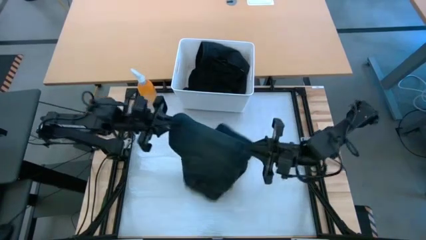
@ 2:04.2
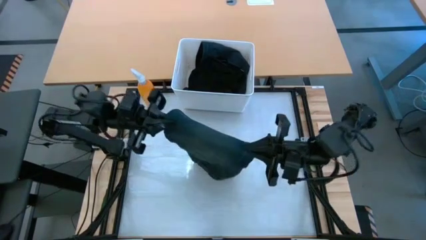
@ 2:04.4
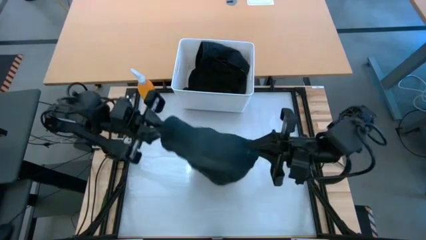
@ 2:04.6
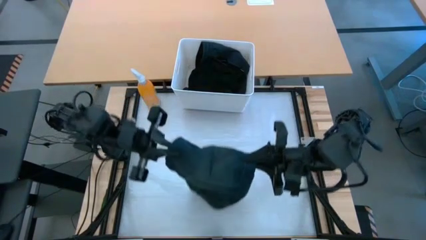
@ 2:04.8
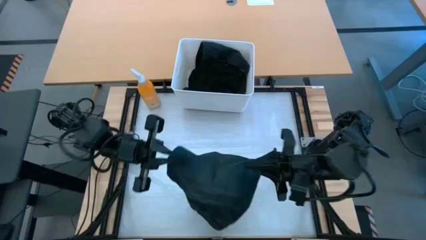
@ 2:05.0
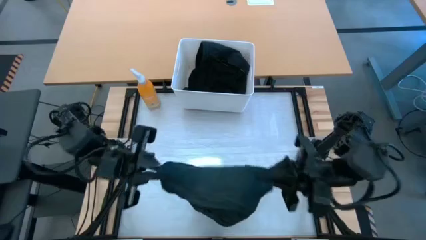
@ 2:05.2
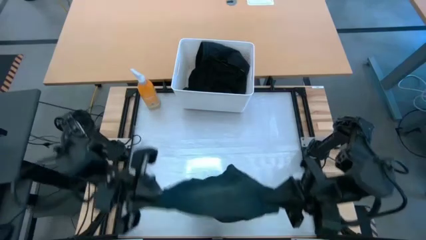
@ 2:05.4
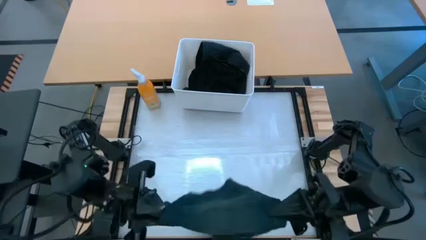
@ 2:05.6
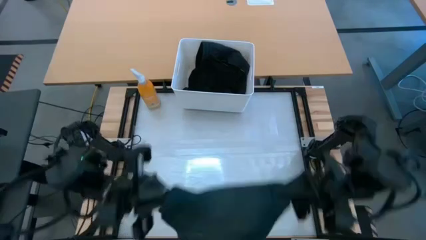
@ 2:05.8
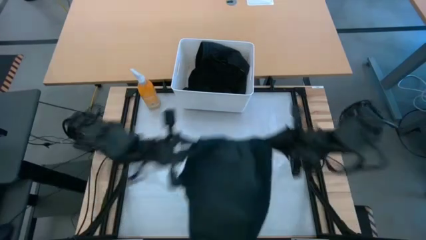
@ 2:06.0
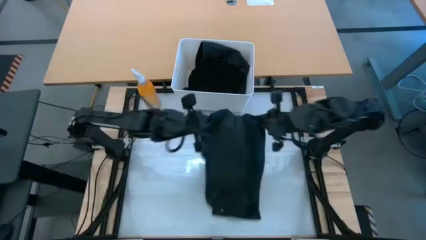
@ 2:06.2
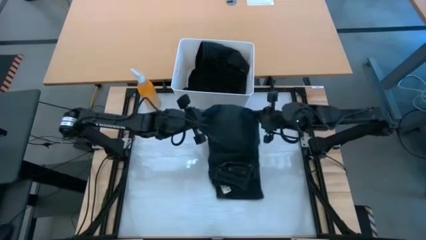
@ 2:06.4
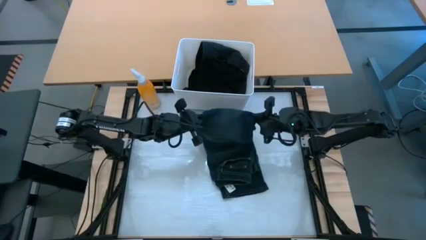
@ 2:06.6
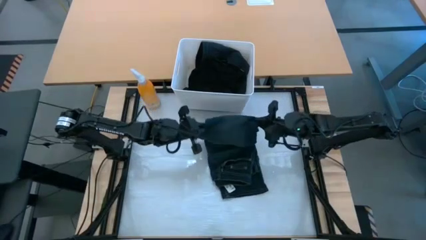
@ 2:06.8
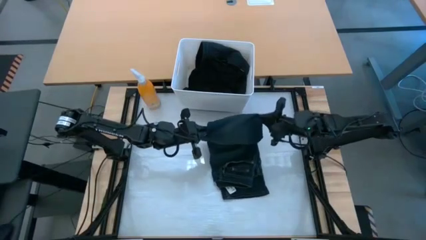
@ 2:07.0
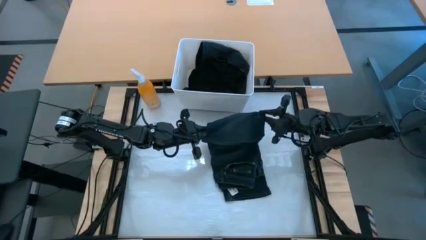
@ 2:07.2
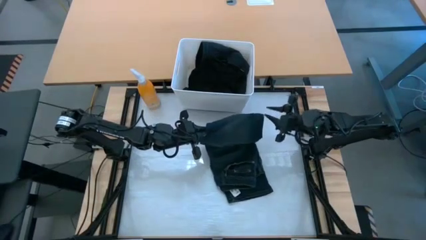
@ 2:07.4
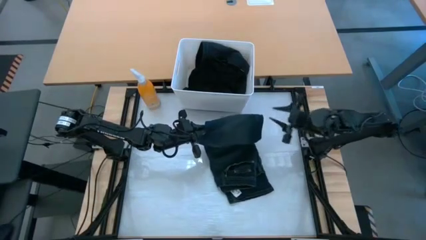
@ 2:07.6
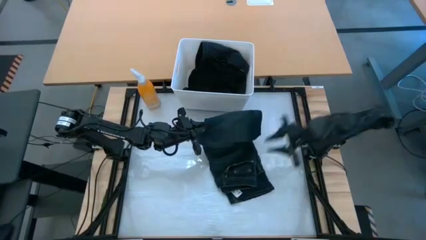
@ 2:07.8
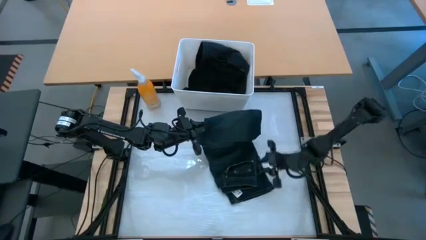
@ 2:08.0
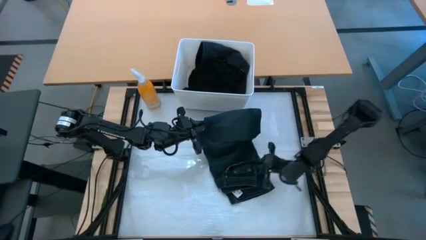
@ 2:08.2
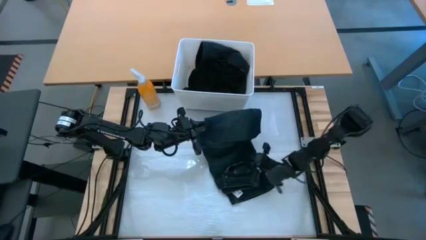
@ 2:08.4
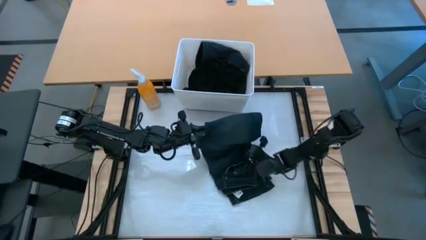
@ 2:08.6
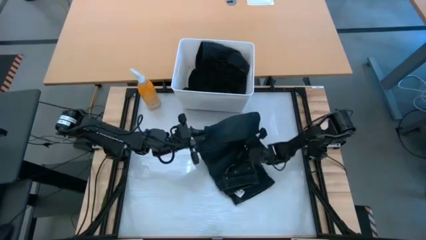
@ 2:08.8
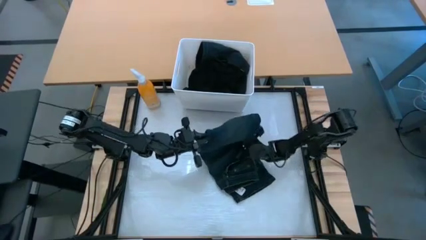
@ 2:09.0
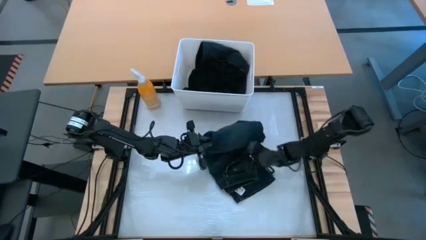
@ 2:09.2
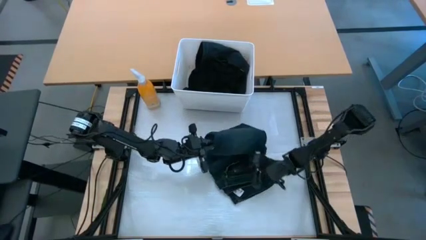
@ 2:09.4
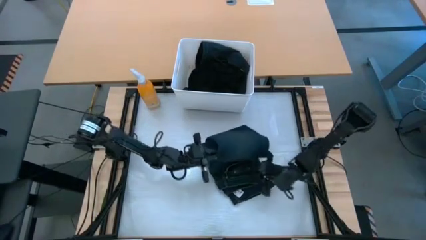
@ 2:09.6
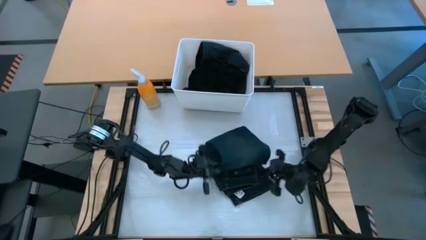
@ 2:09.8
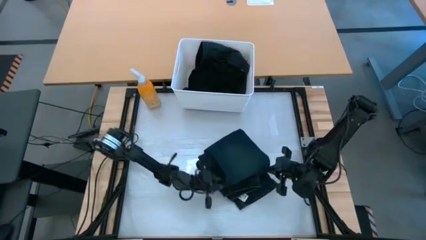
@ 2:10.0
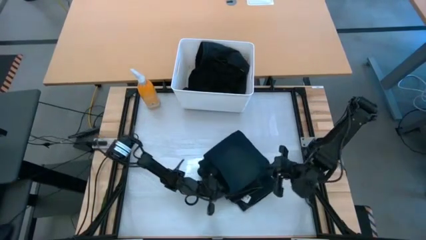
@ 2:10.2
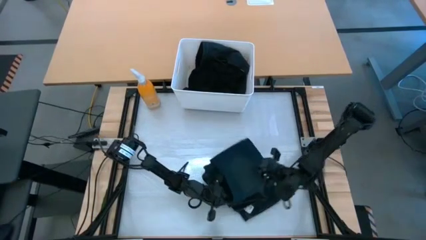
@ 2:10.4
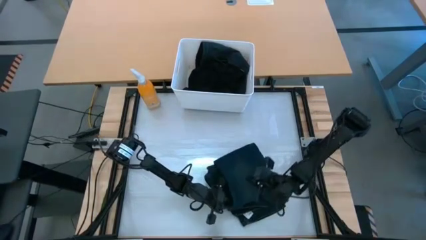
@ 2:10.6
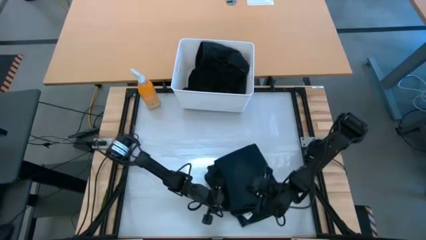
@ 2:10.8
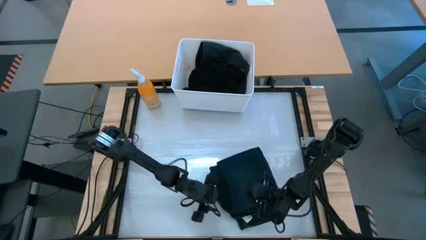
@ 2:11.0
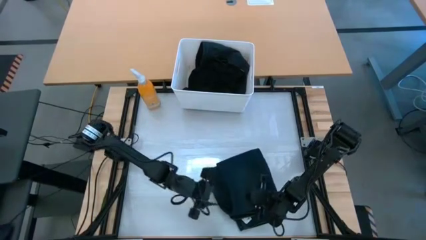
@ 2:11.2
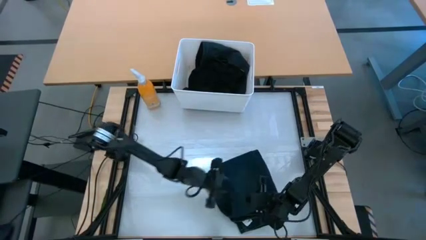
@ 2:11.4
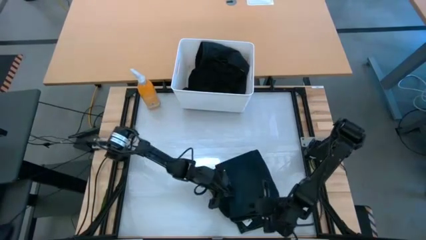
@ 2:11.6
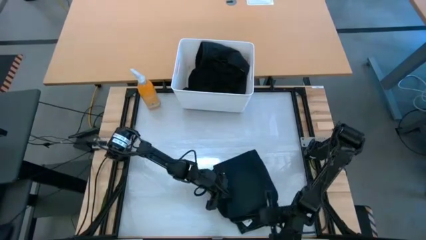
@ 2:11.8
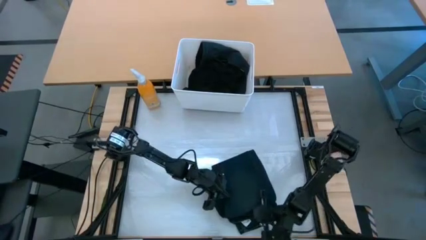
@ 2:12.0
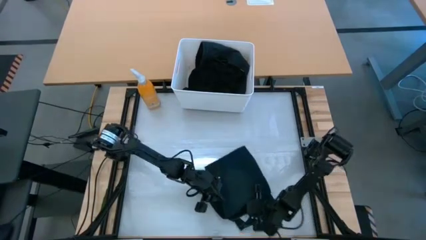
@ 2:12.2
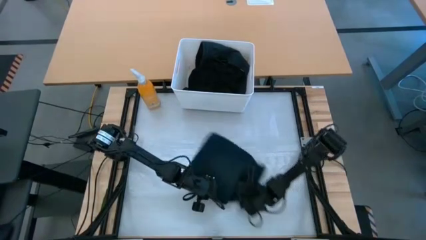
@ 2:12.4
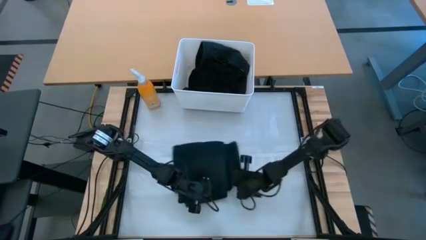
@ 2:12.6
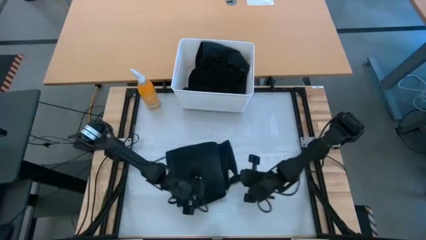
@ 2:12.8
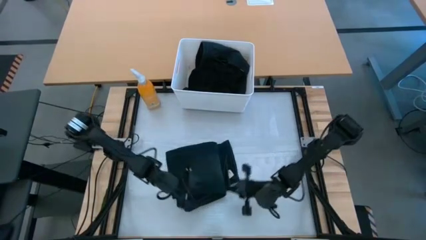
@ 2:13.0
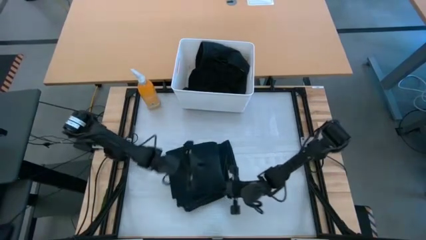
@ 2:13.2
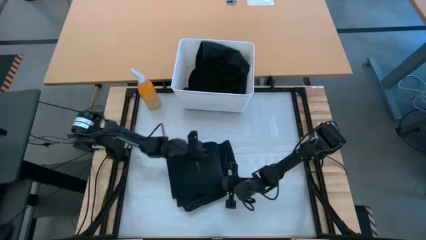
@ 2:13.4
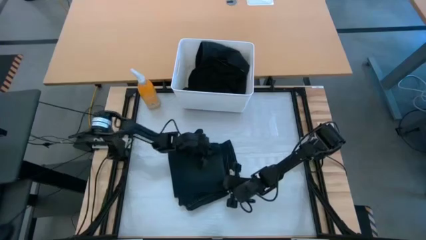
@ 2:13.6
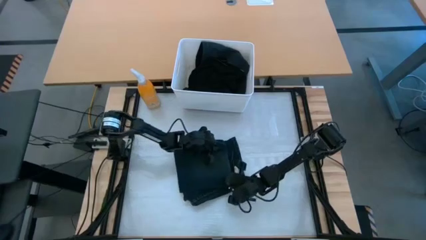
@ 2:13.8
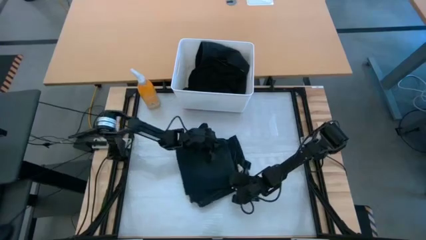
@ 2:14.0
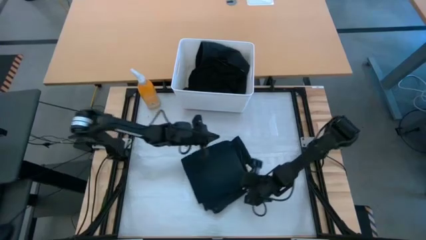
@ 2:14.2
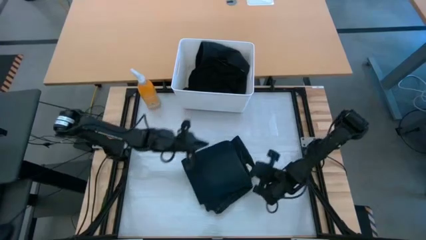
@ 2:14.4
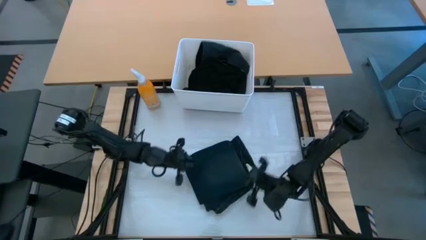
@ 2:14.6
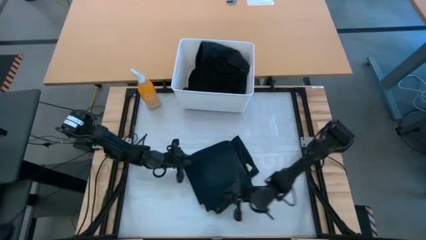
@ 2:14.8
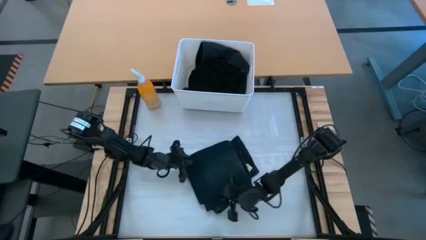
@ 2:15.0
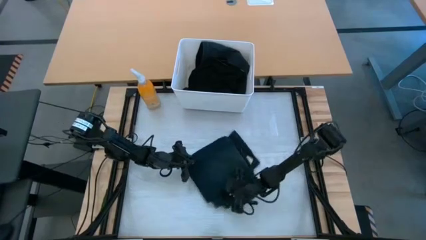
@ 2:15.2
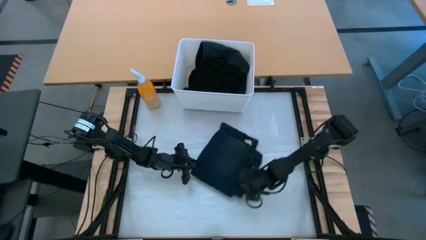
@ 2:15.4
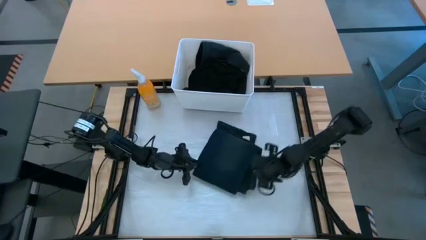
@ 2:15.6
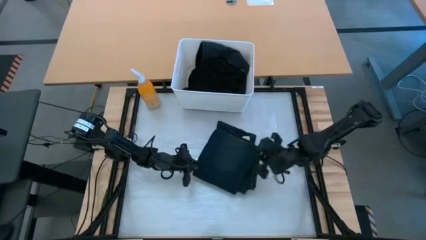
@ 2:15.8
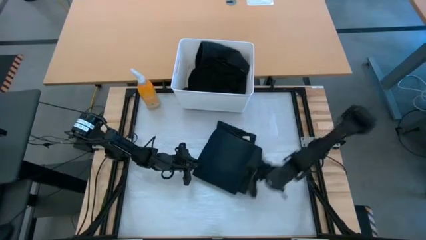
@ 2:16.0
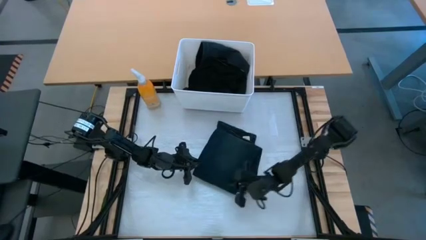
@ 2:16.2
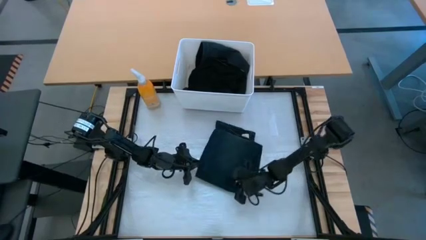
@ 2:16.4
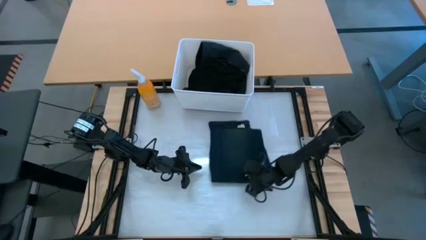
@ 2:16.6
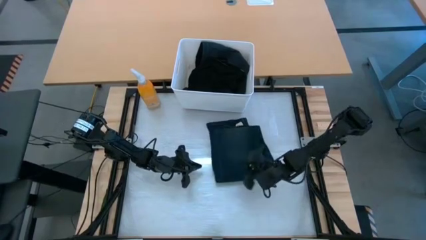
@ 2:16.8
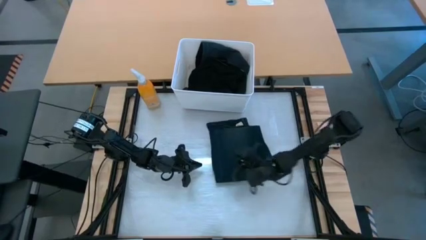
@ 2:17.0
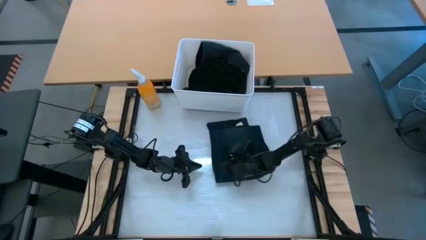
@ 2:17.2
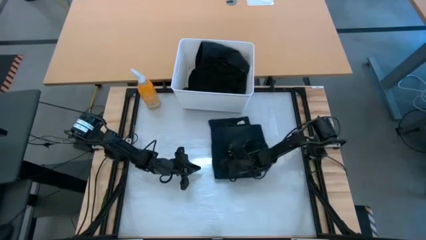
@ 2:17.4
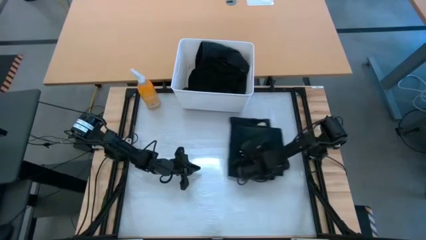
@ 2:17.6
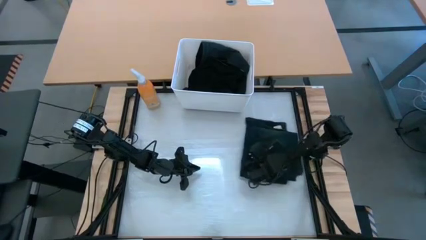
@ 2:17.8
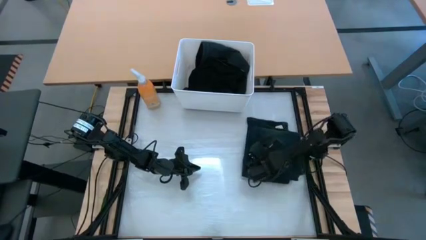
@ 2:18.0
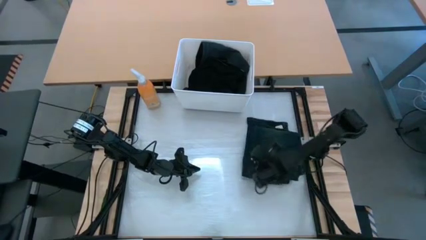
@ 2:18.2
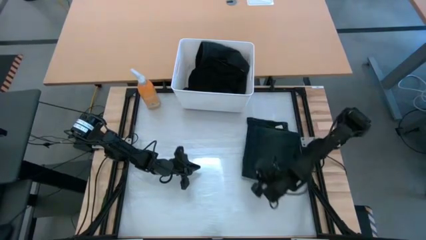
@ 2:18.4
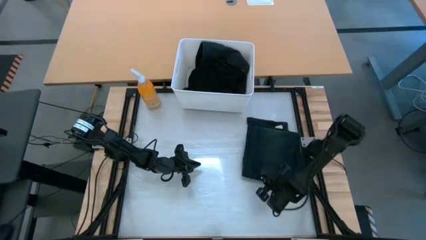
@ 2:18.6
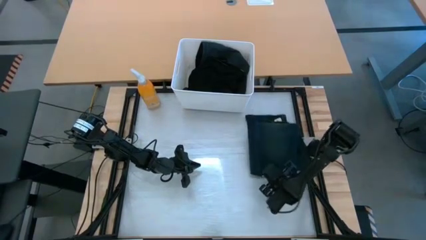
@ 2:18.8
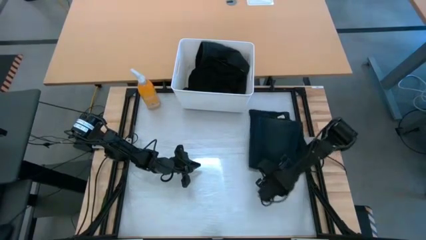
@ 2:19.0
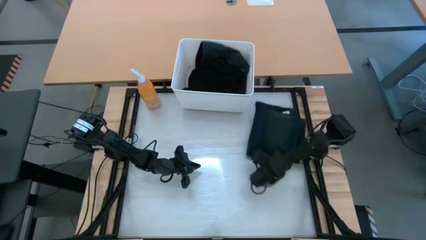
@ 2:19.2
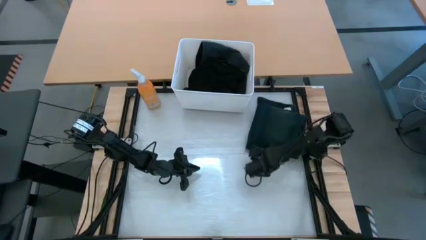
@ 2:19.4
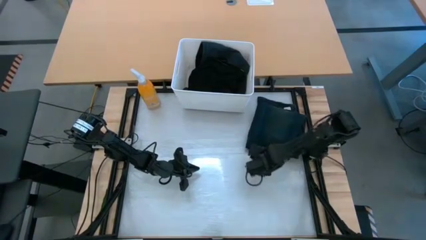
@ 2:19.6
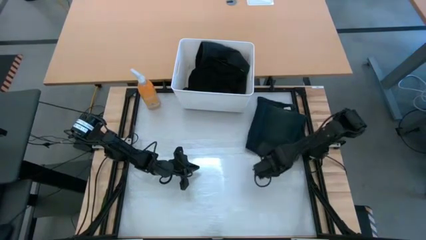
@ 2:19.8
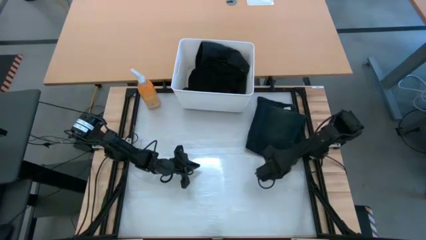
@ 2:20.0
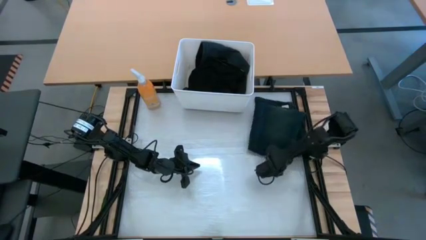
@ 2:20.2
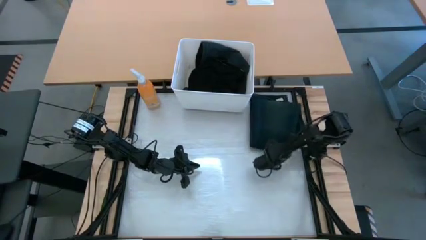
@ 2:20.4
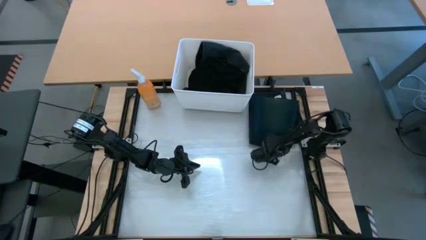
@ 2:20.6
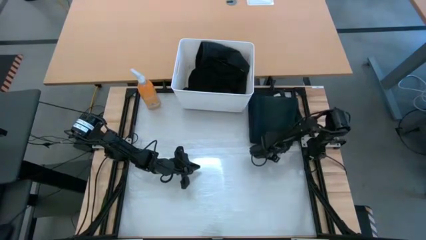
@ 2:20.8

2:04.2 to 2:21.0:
Task: Fold laundry
Fold the blue long pants
